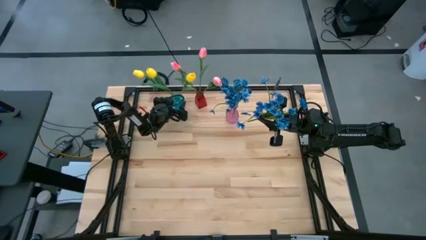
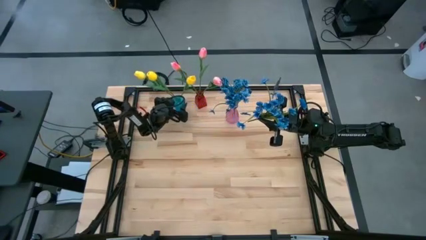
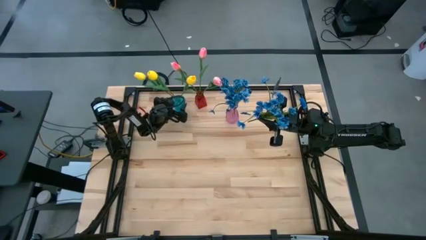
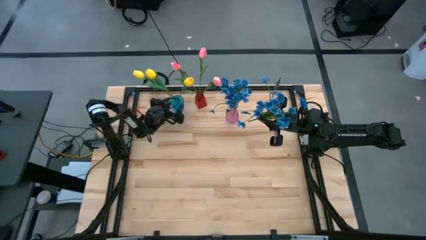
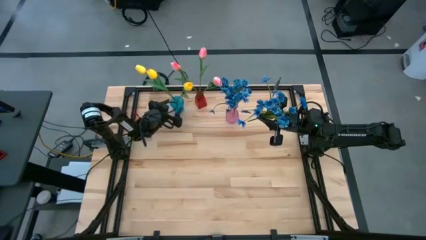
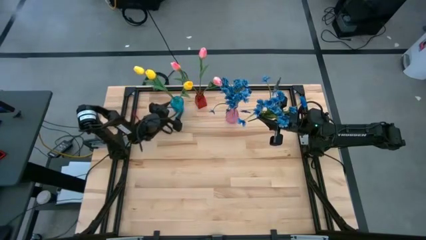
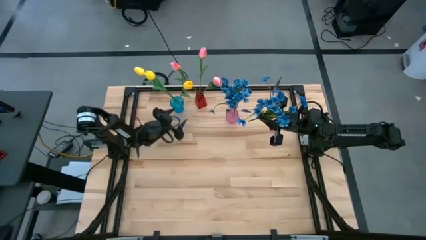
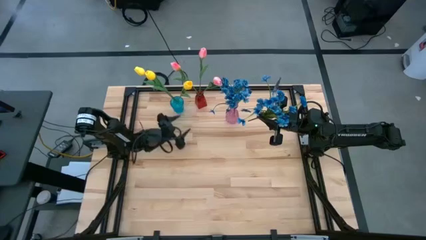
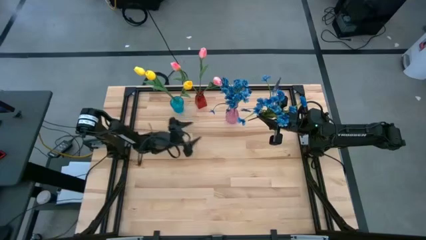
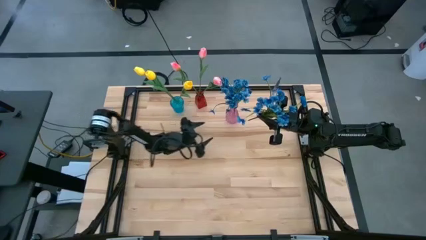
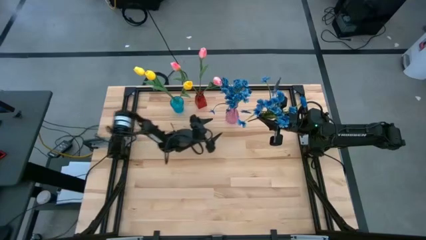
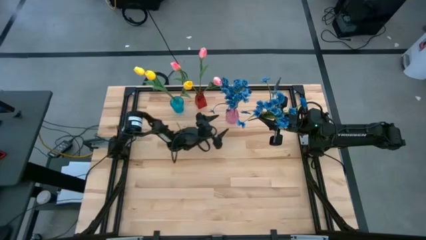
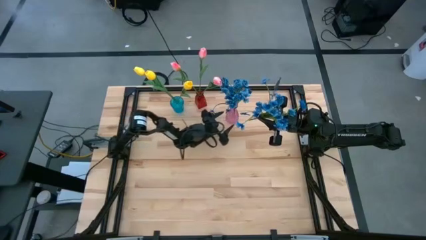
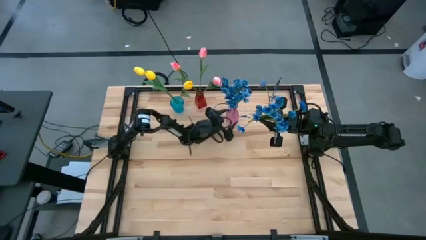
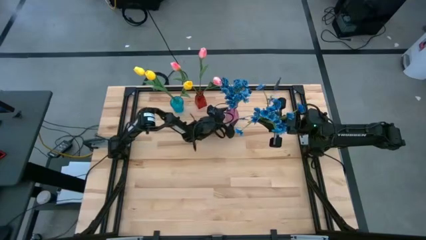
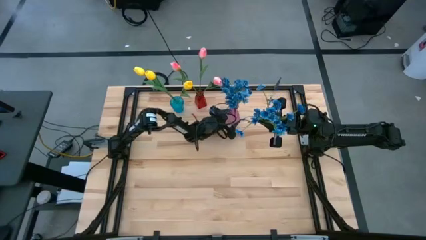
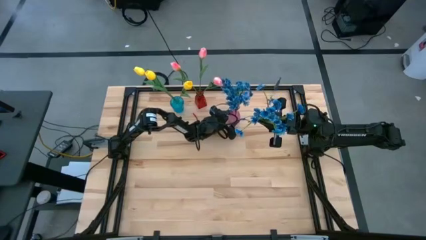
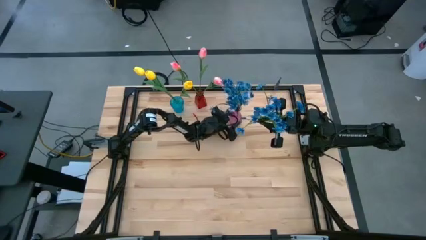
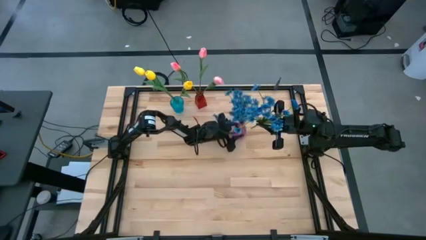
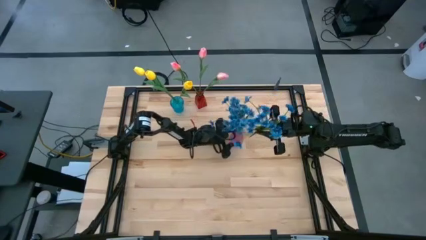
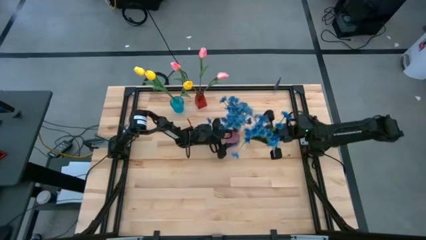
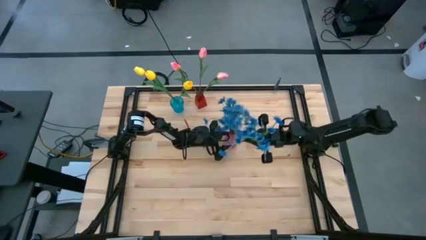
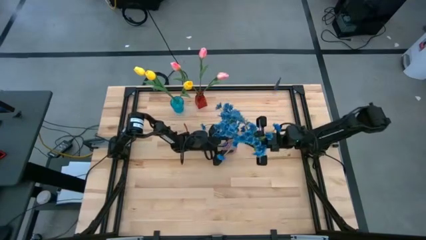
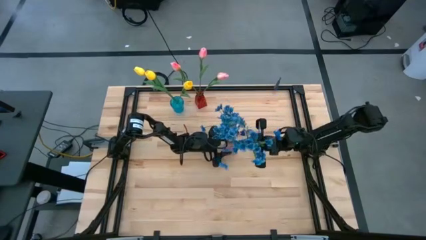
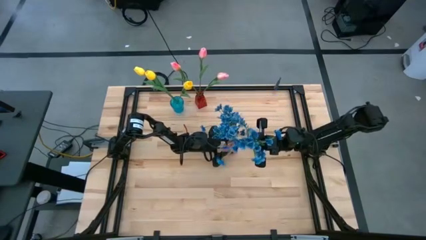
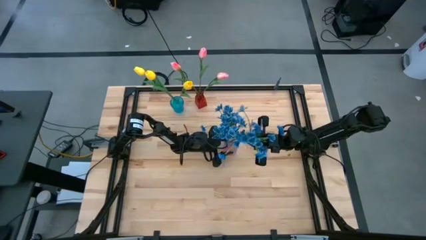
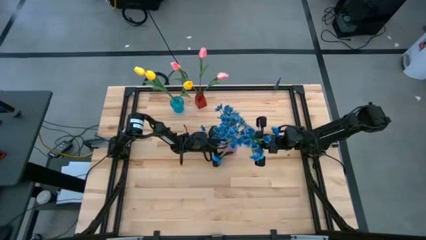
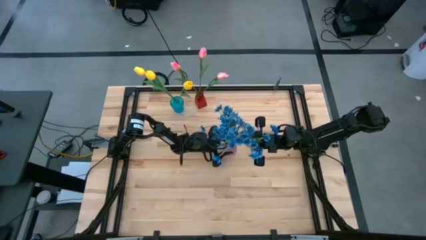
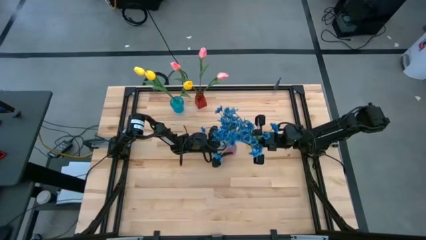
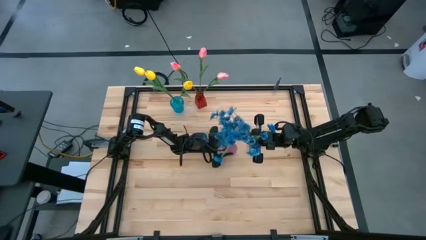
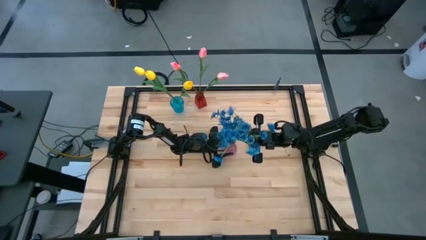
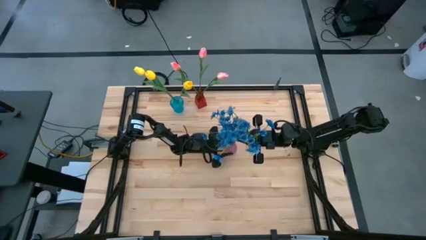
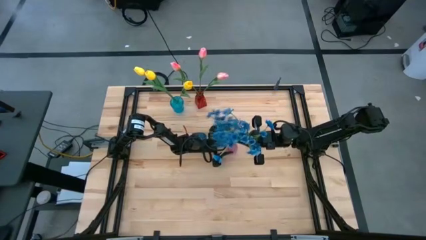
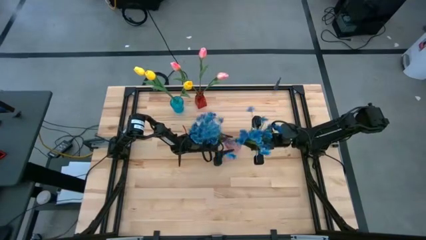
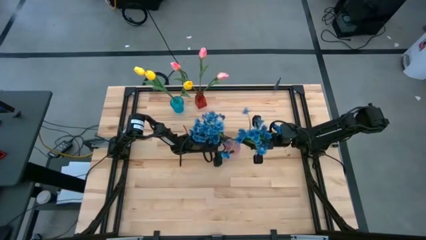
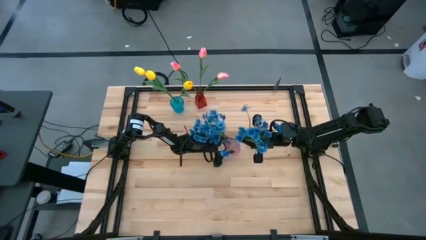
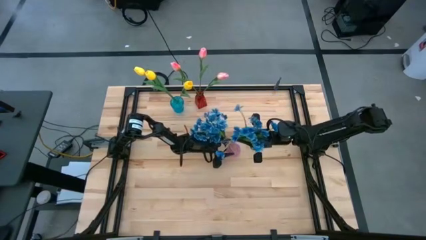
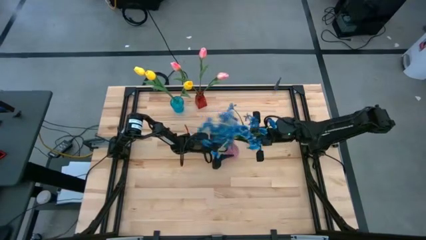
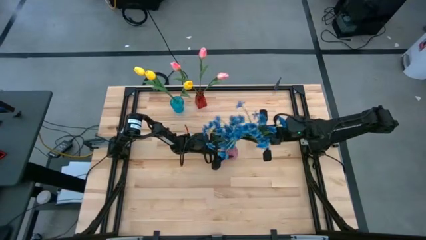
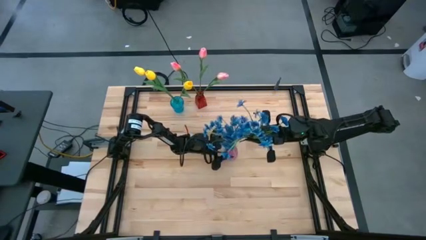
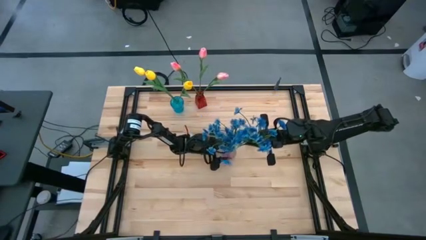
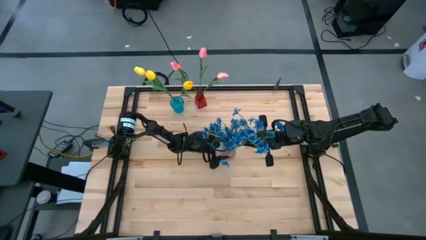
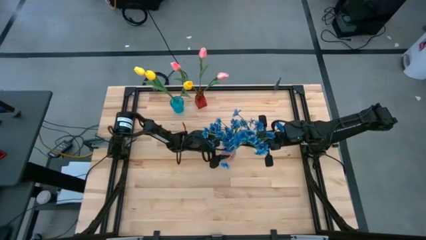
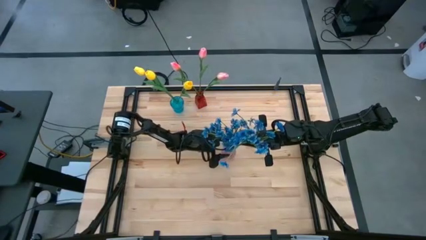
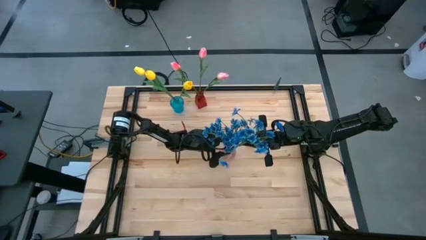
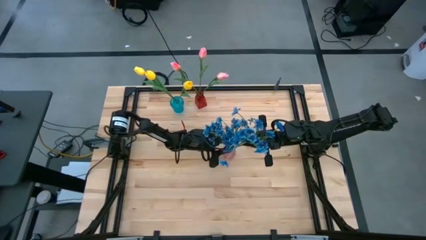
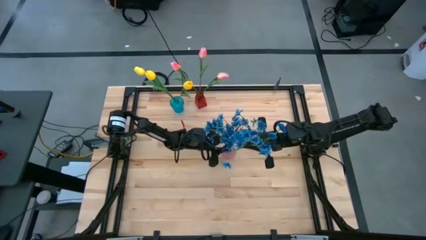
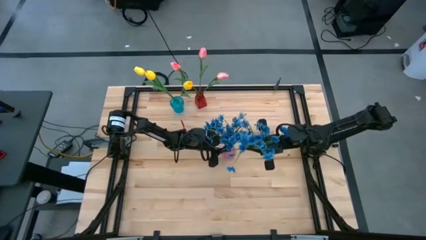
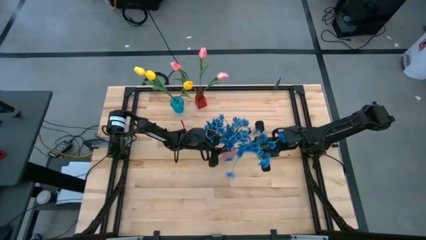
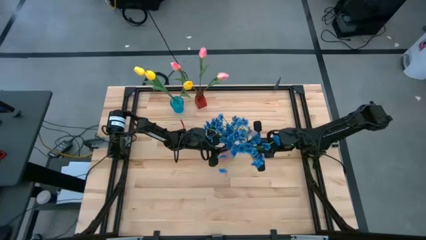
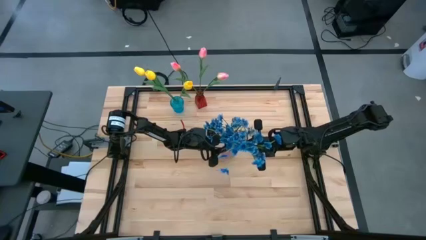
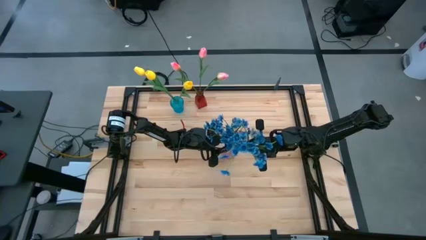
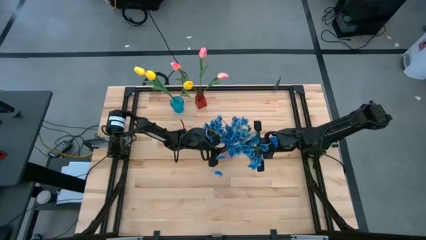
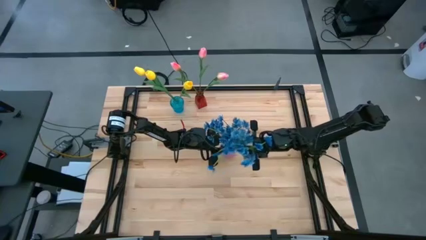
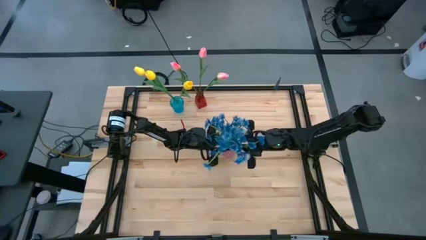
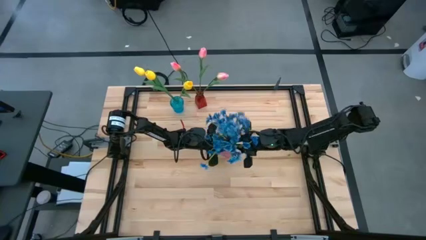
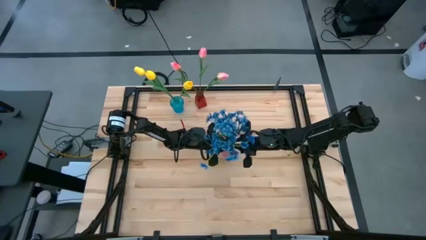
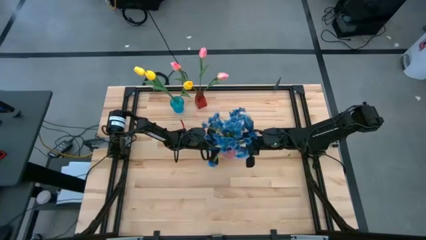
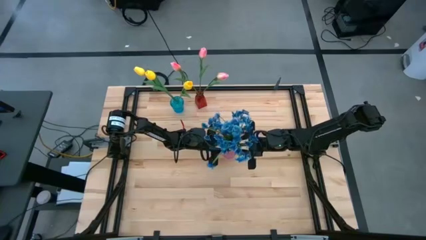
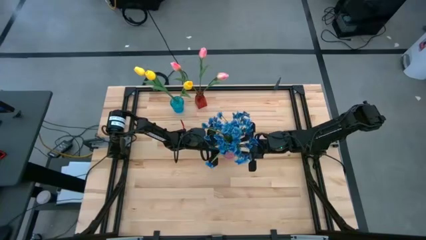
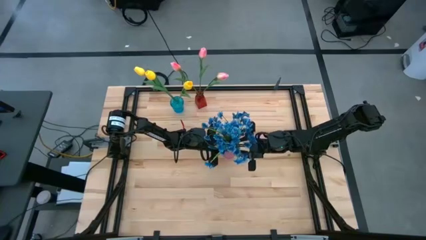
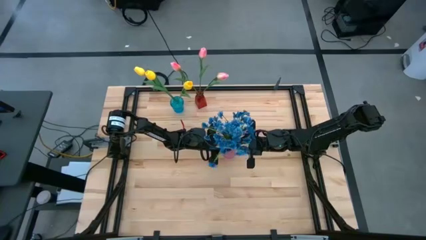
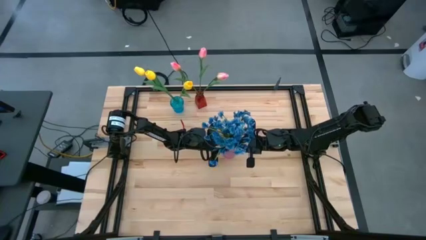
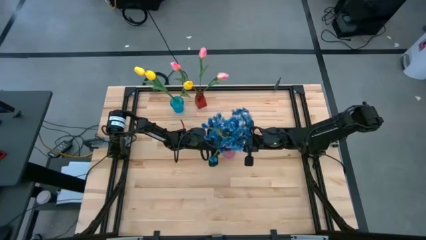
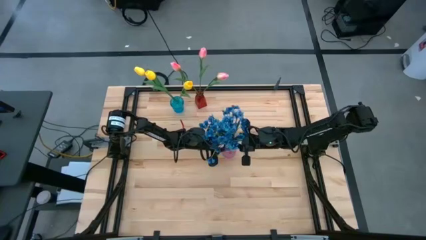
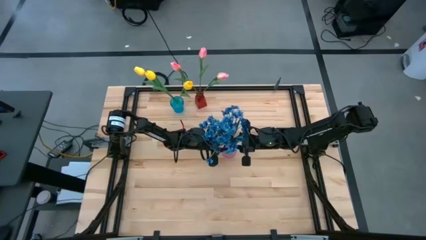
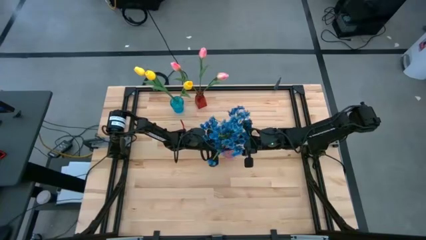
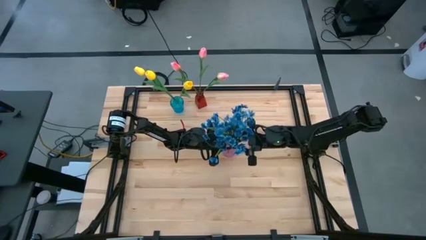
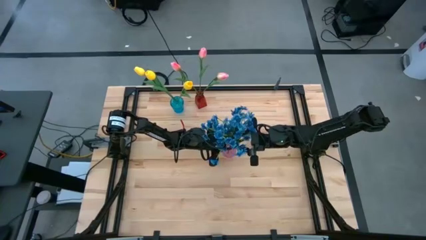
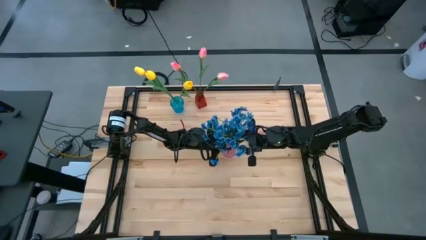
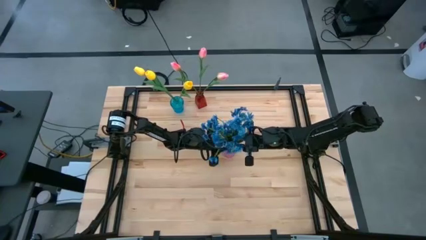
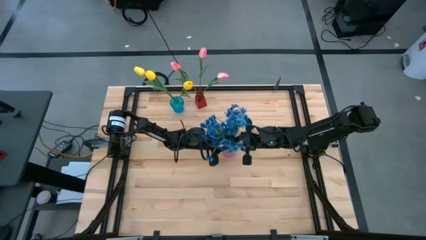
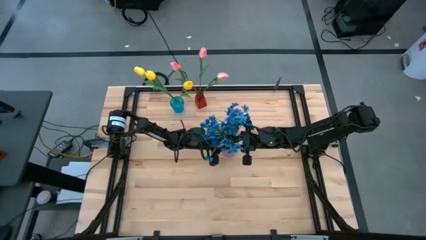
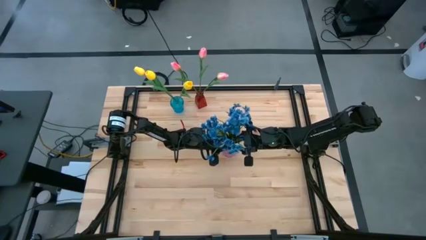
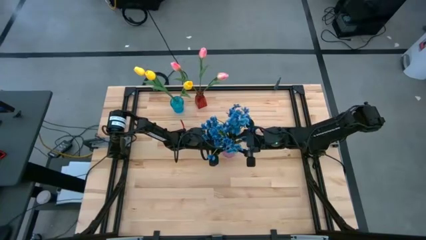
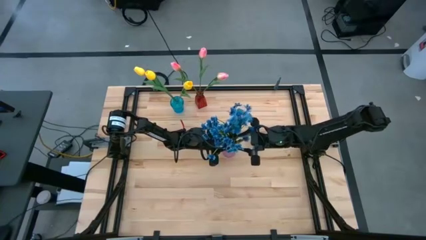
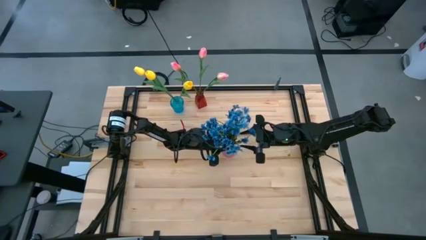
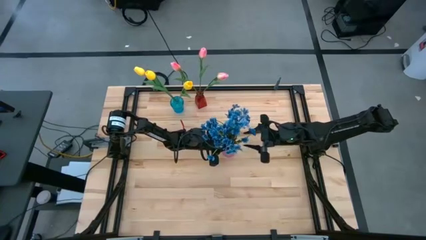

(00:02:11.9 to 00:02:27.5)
Task: Sort flowers into vase by color
Put the blue flowers into the pink vase
